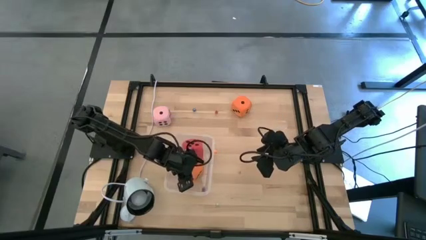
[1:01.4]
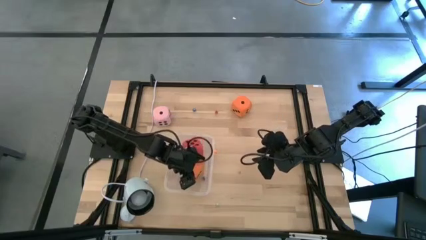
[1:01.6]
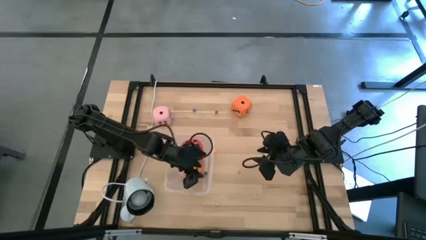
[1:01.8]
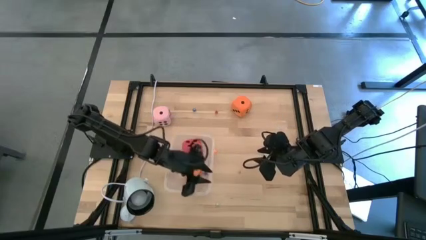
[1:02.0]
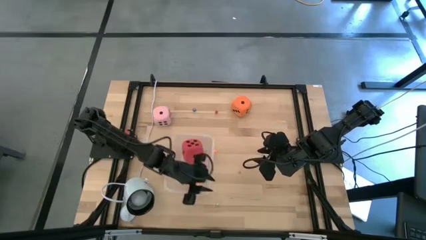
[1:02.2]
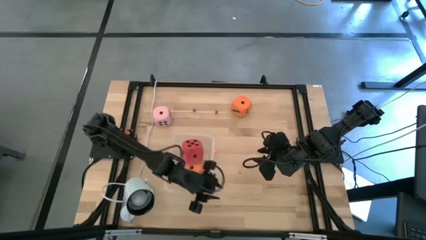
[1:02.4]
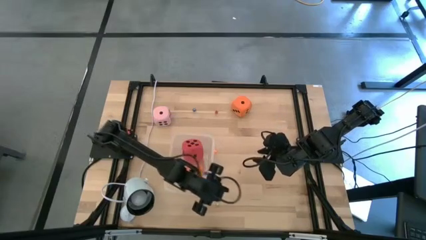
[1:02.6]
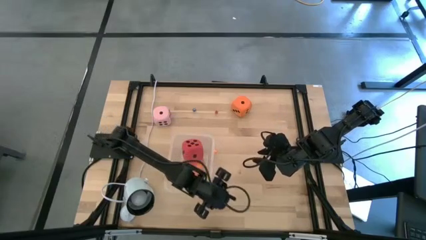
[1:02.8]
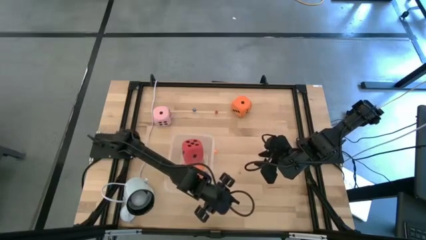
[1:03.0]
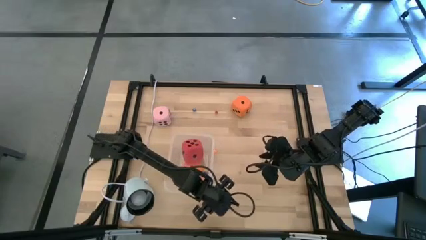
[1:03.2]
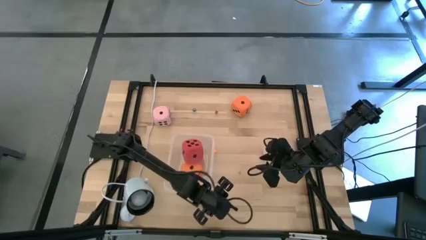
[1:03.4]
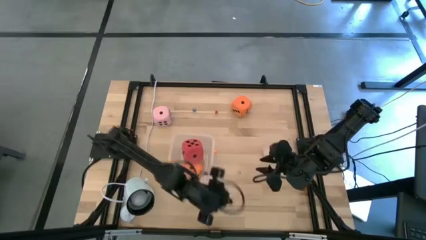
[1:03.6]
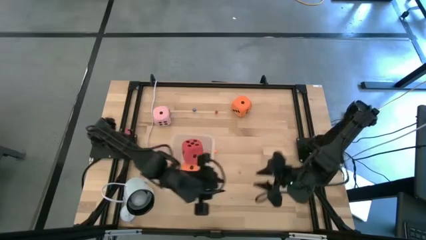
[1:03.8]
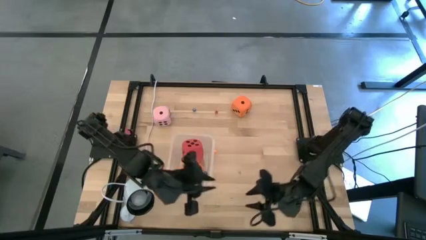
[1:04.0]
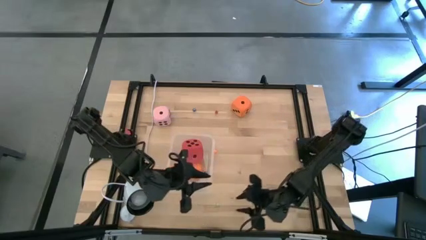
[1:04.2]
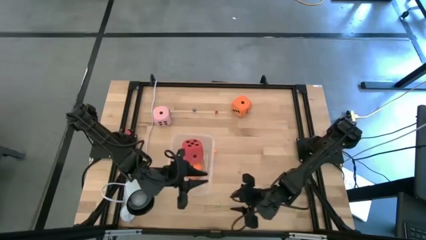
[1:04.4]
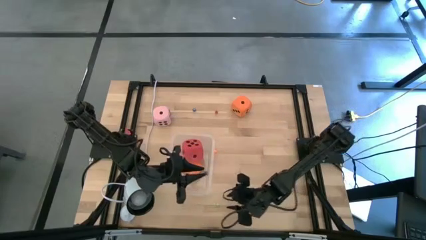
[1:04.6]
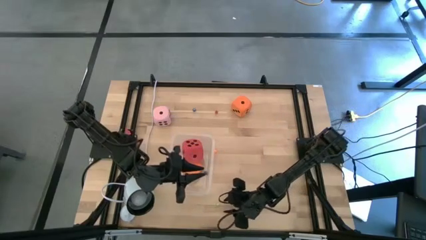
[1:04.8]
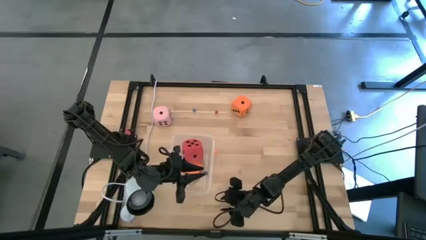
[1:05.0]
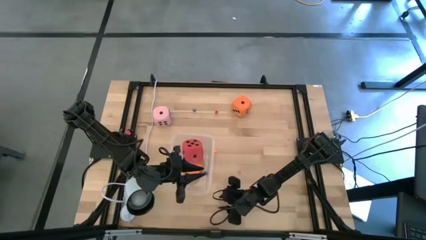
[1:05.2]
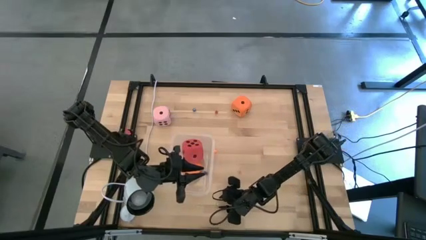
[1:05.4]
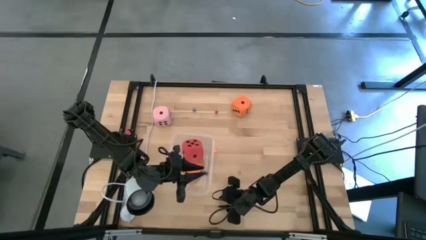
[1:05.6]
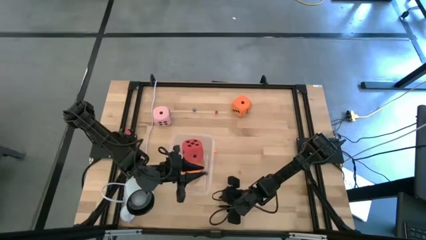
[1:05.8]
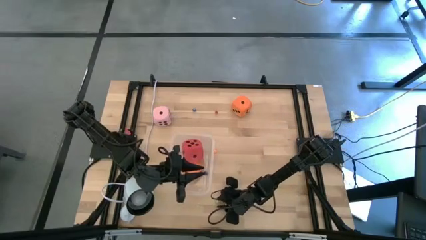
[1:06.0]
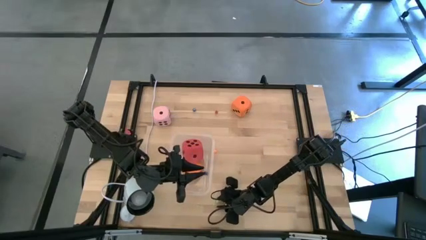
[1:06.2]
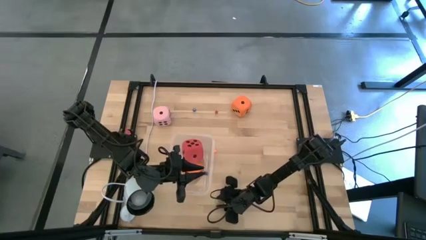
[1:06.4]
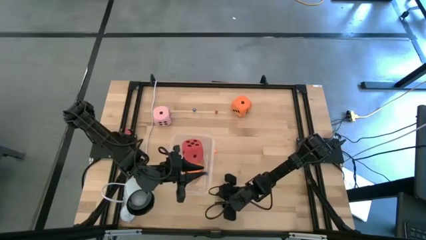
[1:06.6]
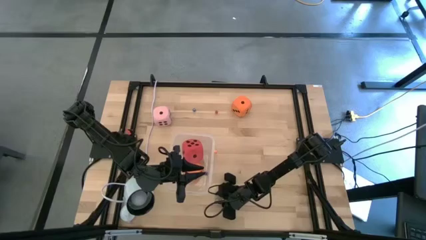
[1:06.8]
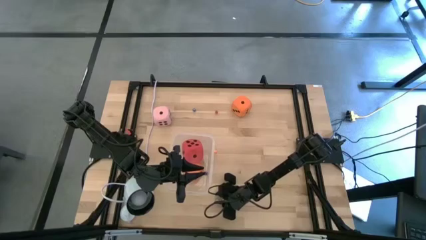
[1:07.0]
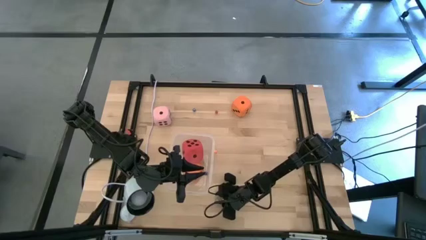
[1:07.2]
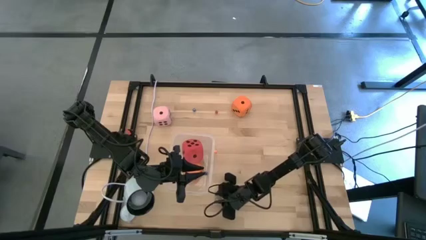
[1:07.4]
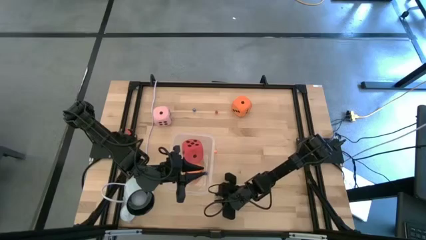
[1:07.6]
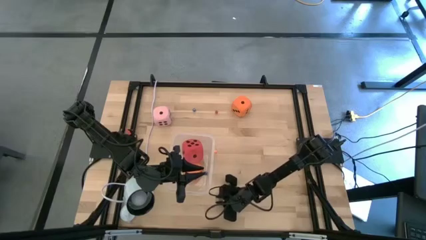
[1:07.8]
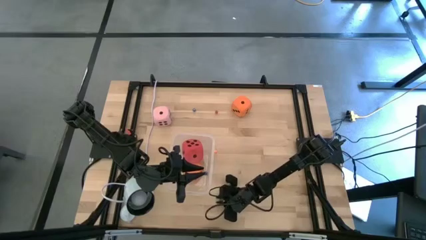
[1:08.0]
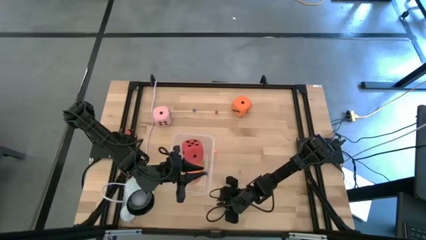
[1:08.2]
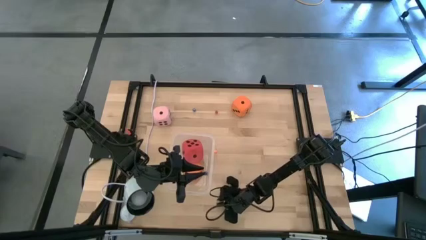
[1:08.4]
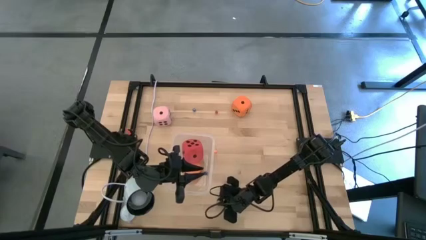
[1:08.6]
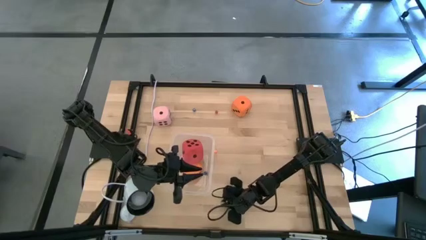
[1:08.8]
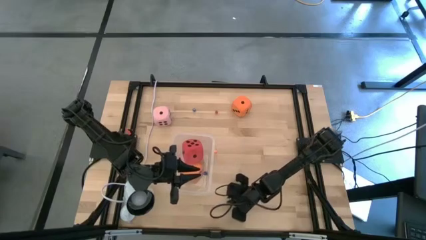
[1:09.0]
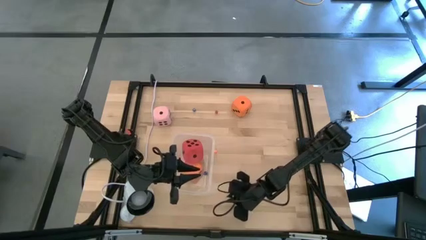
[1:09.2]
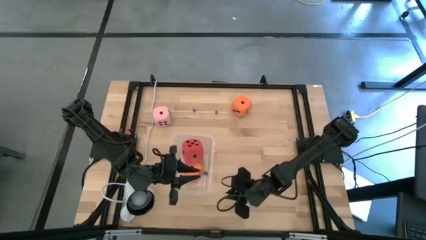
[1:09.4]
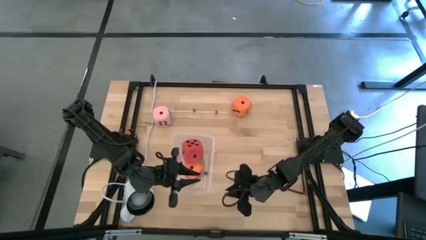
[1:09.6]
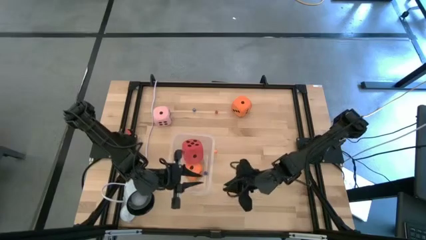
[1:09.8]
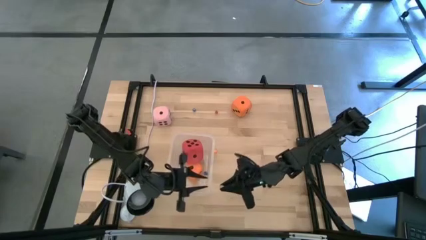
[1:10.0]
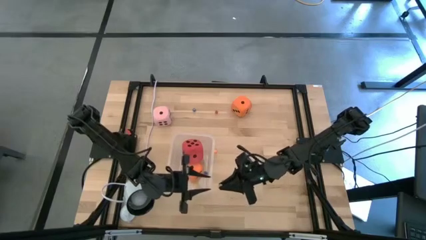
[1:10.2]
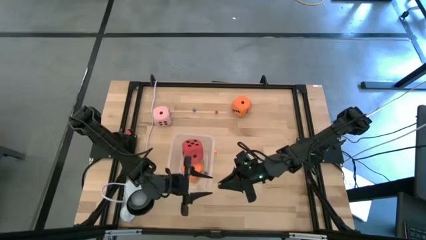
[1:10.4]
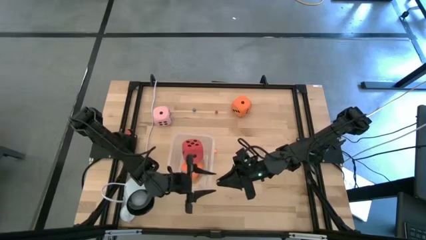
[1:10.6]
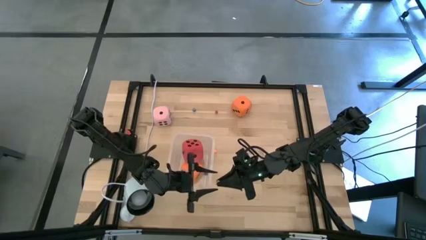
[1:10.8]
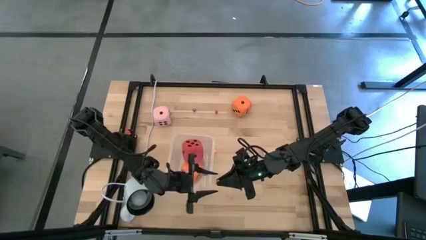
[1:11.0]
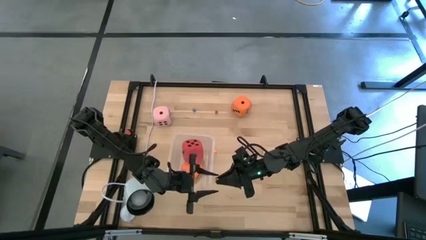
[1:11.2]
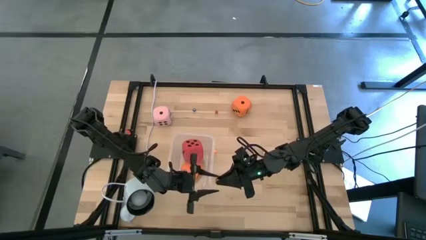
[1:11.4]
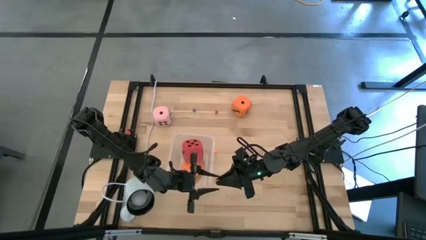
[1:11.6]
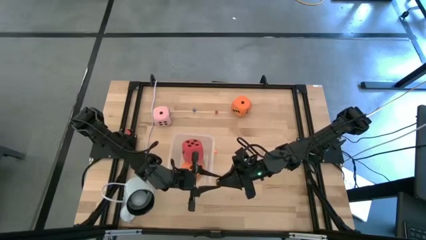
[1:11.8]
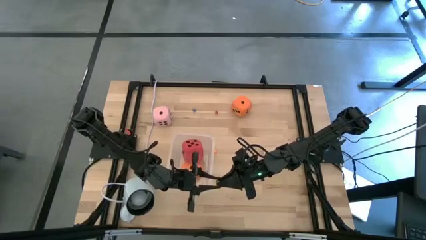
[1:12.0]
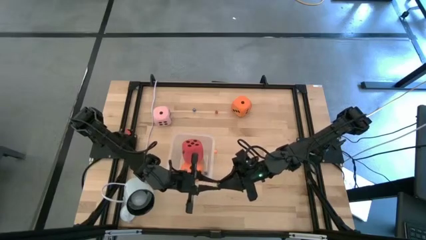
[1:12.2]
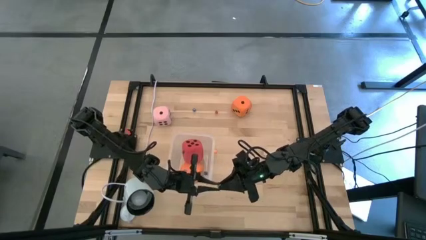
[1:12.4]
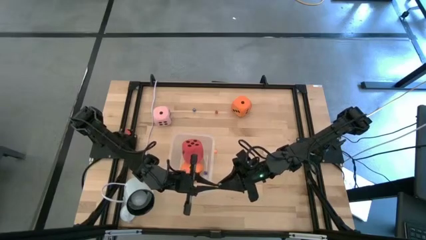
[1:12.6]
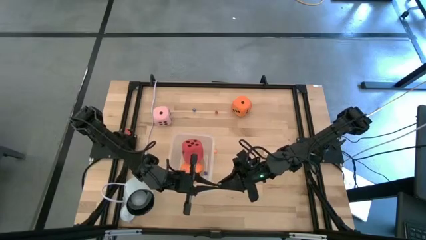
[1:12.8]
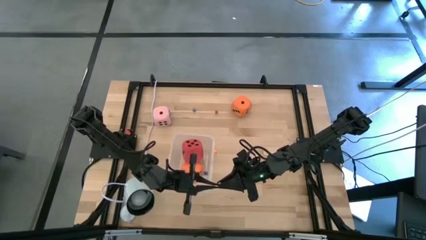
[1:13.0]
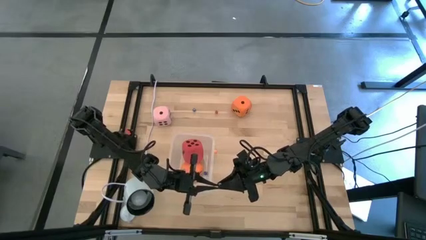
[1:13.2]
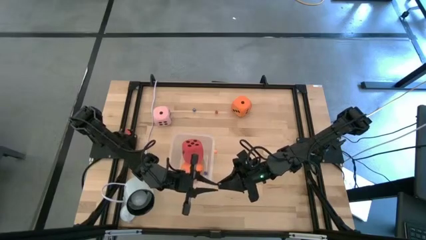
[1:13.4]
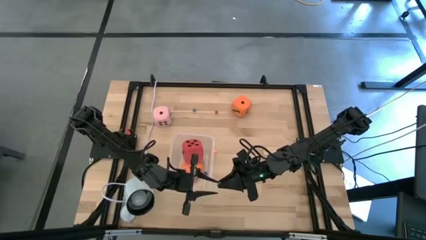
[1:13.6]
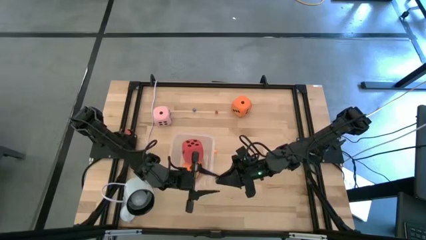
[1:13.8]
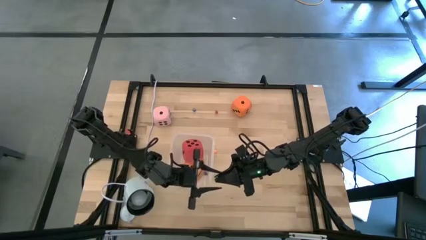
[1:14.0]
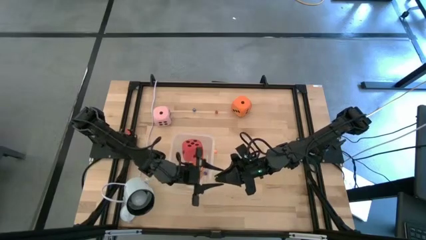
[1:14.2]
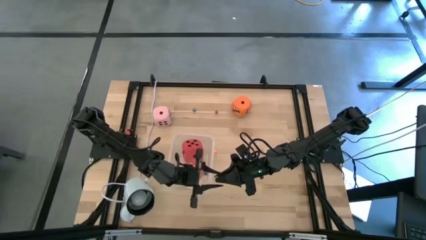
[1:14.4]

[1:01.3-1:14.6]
Task: Pick & Place Dice
Put the small yellow die on the bin

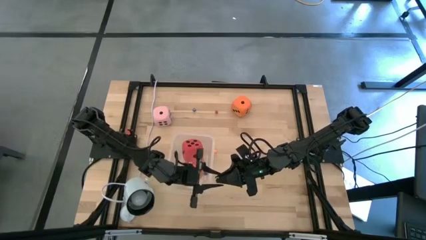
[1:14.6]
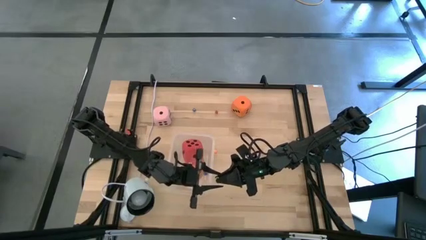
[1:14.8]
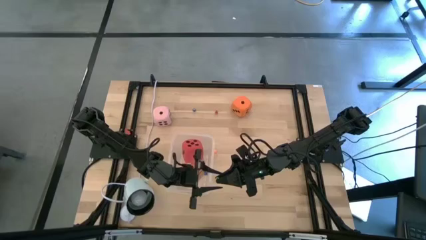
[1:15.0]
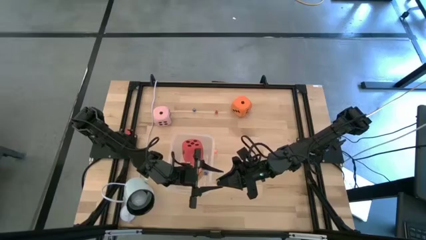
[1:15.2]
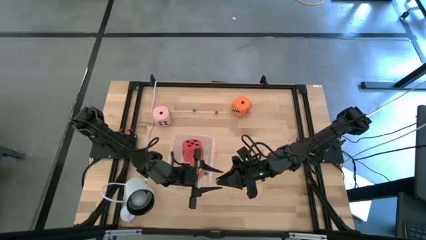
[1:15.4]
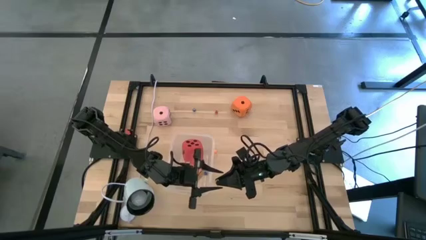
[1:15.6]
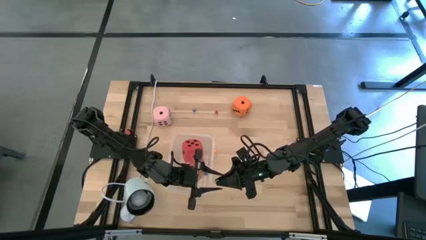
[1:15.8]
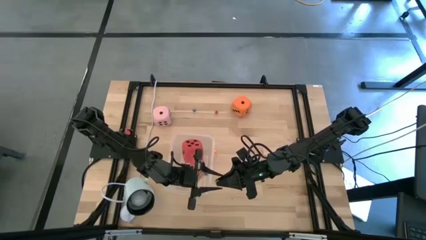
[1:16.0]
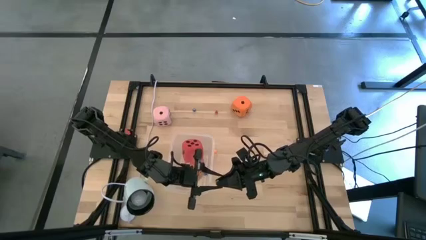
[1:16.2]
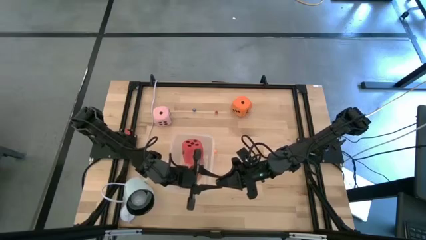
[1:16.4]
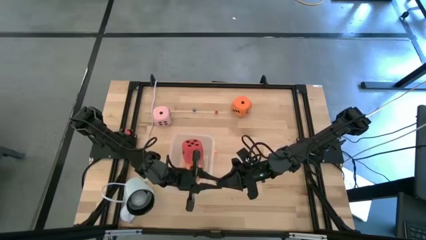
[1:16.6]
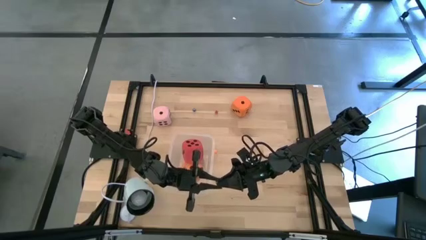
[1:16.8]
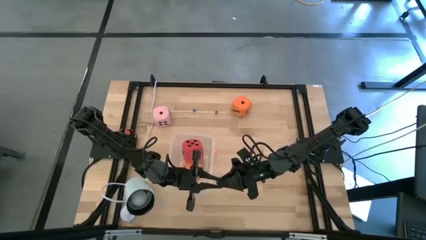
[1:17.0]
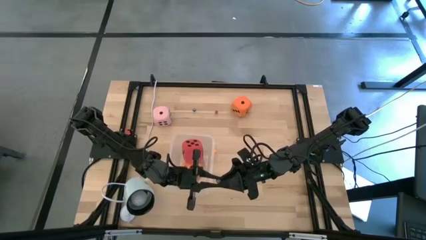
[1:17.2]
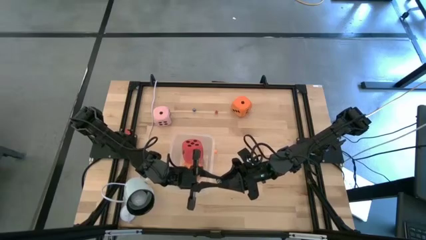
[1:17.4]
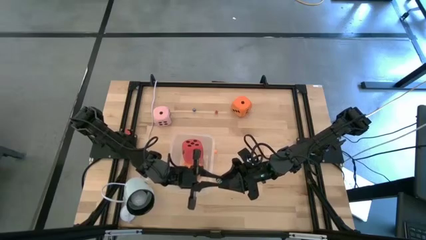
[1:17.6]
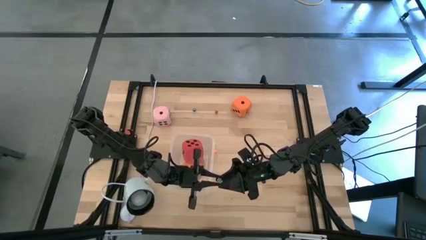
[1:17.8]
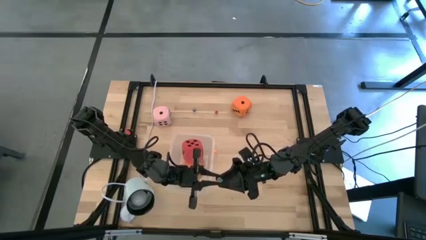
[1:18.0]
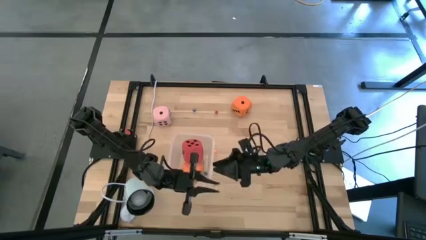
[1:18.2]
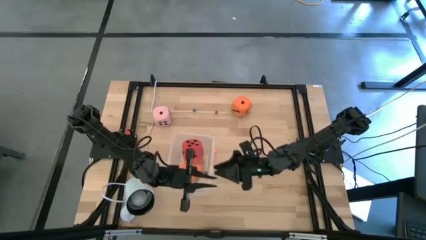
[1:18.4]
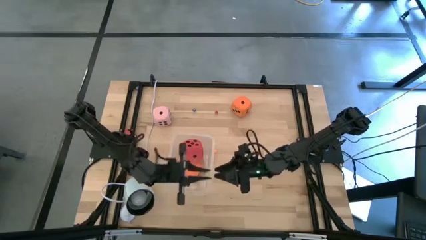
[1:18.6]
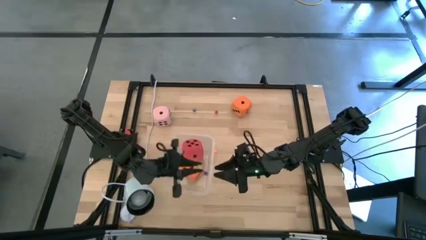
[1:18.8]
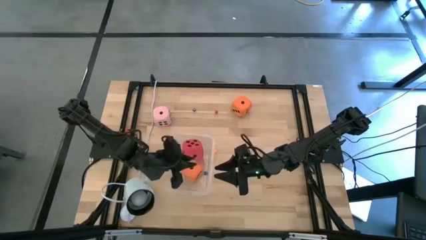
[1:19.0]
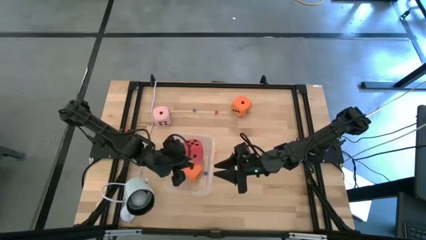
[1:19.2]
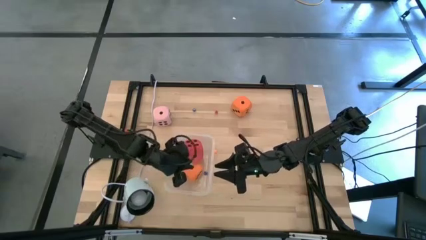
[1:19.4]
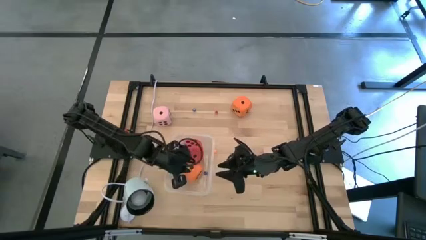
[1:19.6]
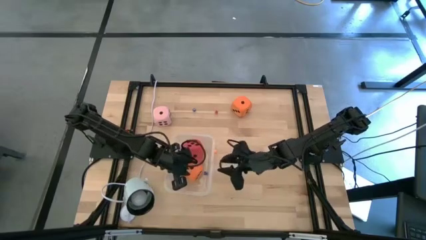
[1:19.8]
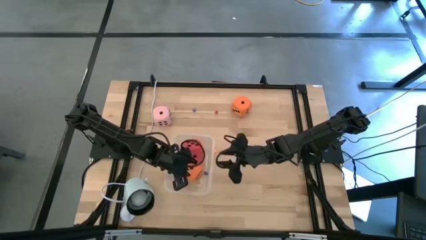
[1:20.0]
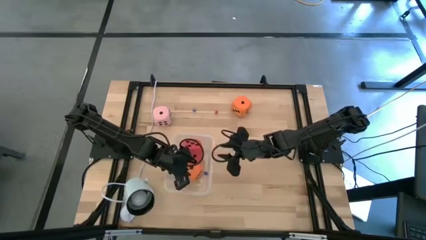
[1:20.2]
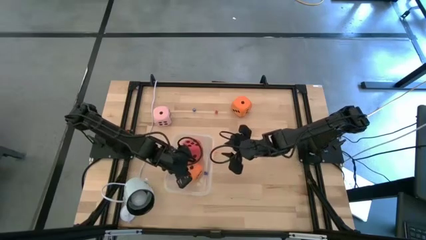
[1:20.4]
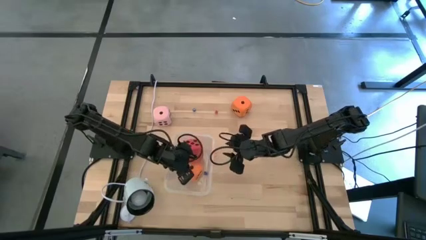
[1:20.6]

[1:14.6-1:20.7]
Put the small yellow die on the bin
